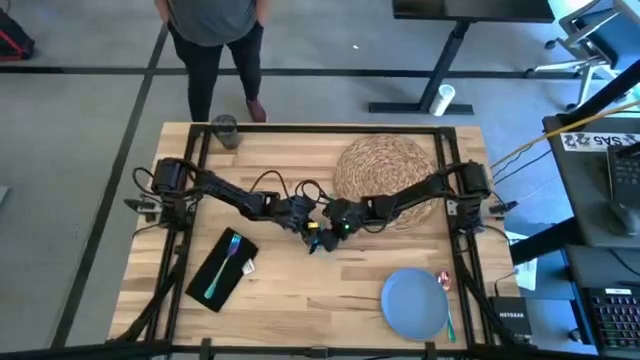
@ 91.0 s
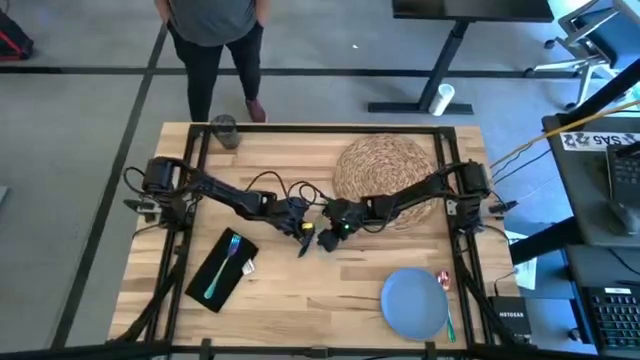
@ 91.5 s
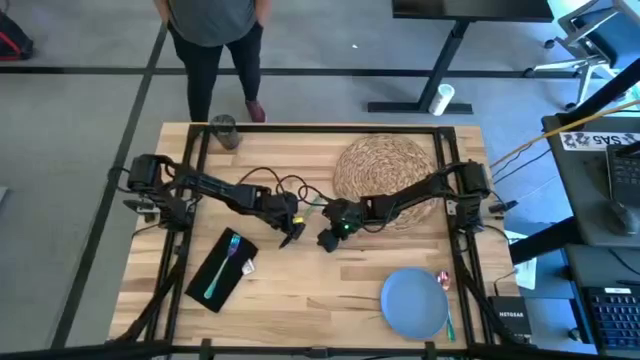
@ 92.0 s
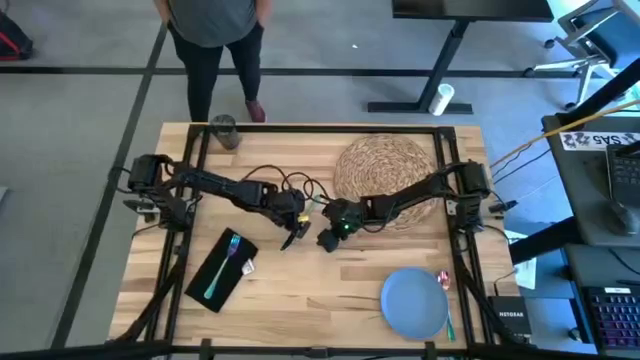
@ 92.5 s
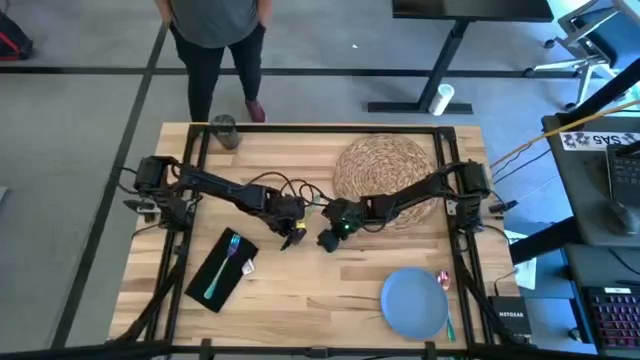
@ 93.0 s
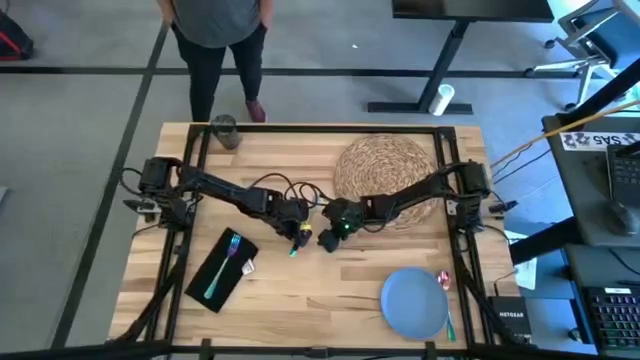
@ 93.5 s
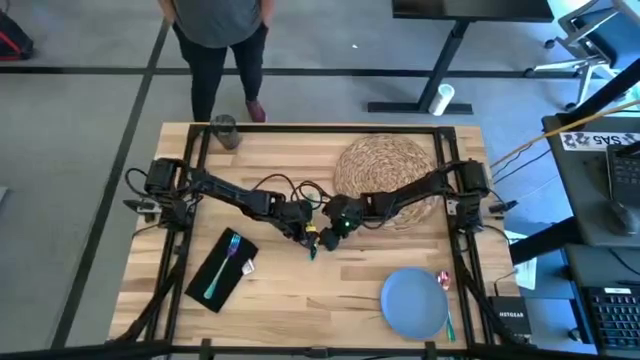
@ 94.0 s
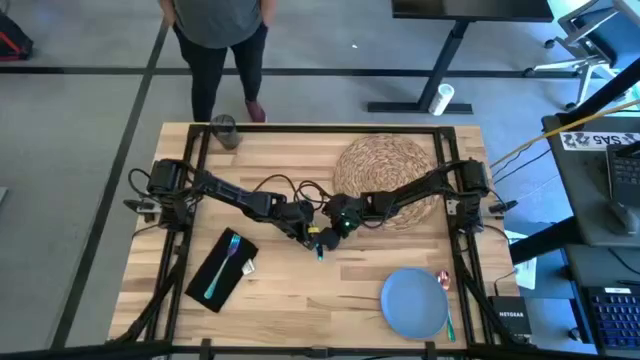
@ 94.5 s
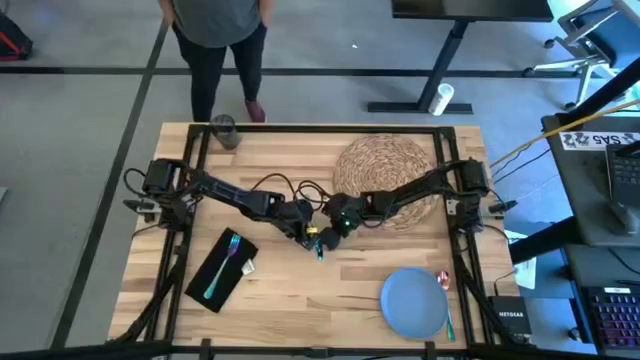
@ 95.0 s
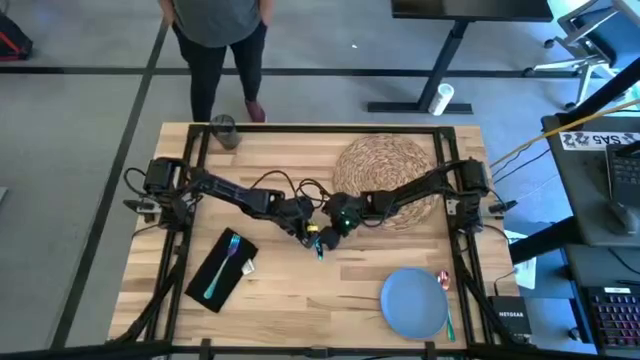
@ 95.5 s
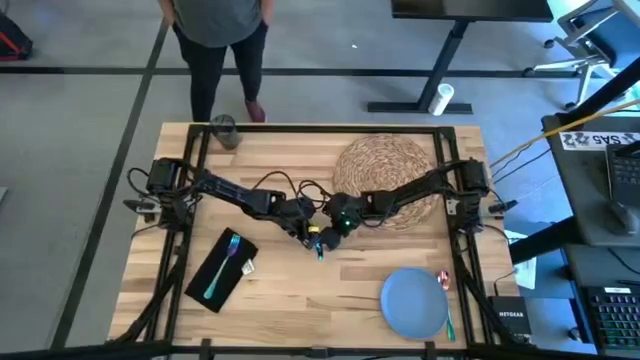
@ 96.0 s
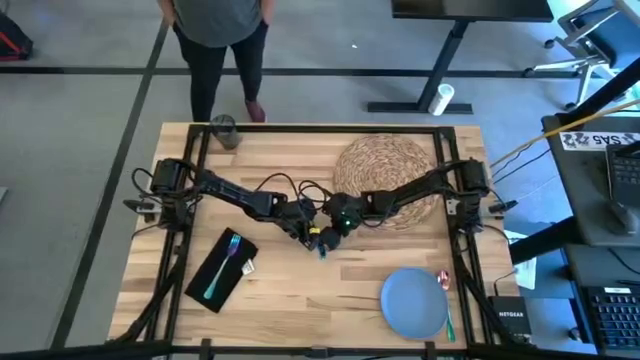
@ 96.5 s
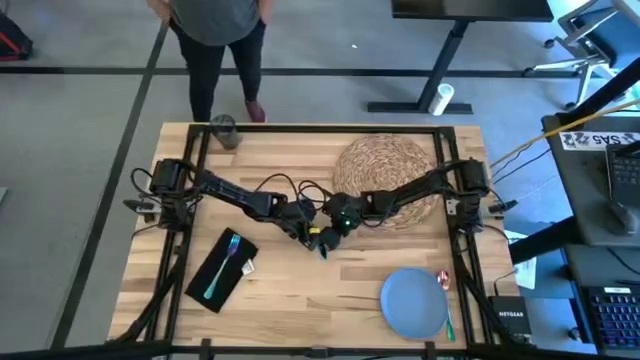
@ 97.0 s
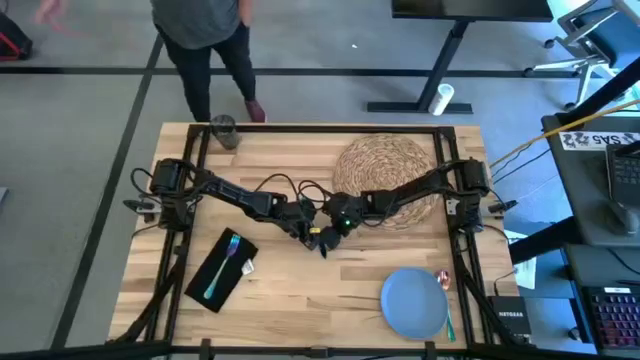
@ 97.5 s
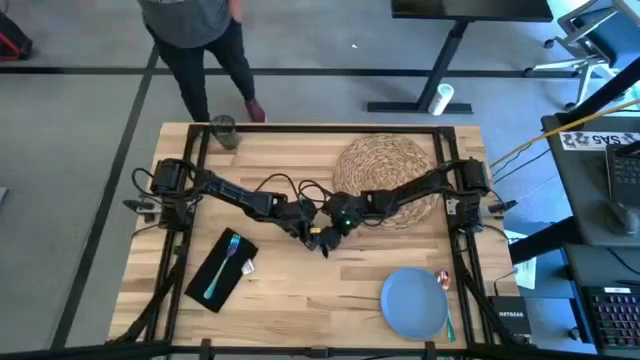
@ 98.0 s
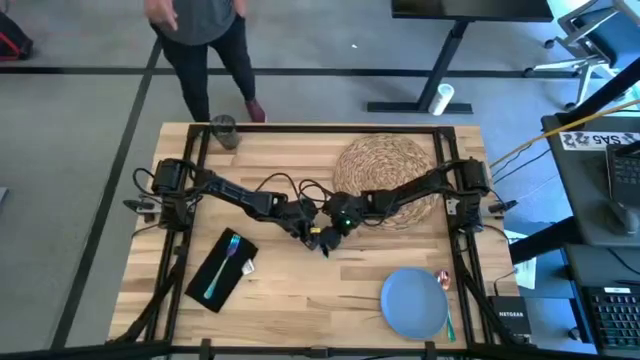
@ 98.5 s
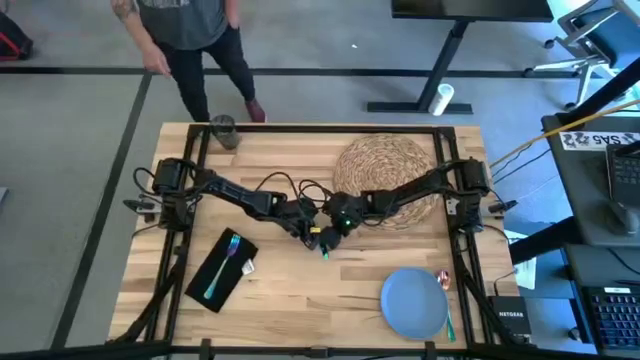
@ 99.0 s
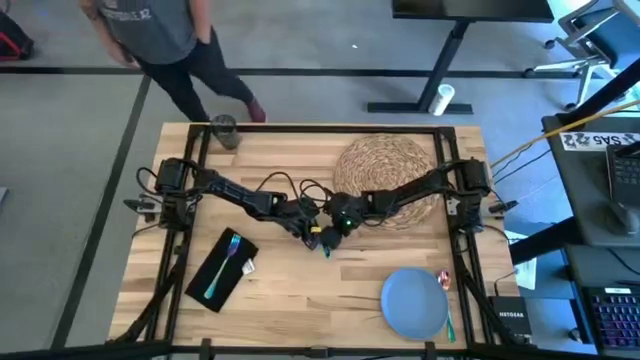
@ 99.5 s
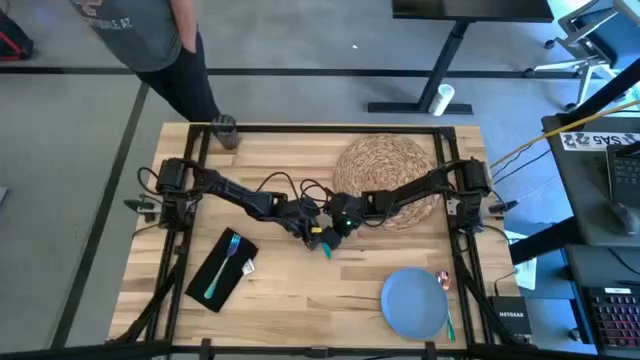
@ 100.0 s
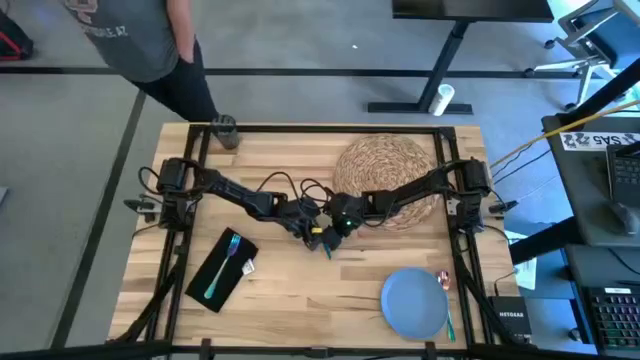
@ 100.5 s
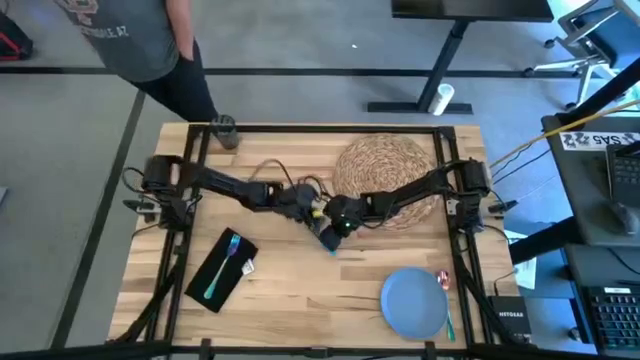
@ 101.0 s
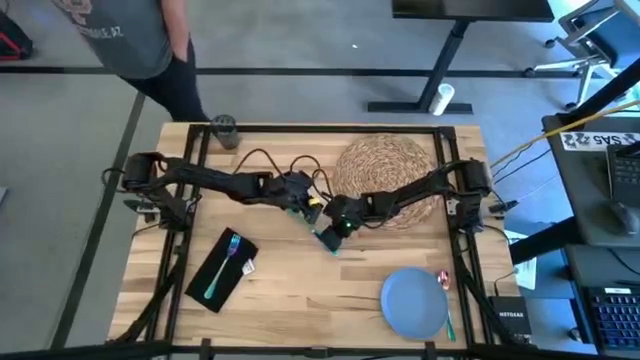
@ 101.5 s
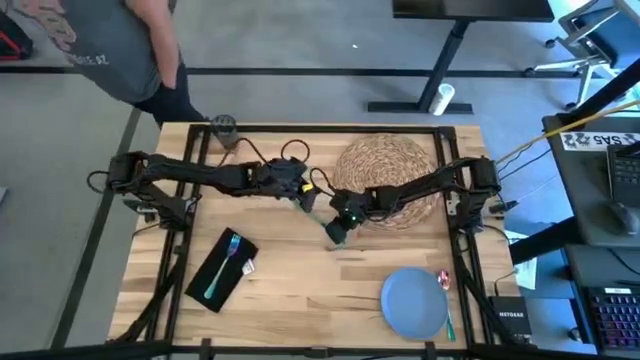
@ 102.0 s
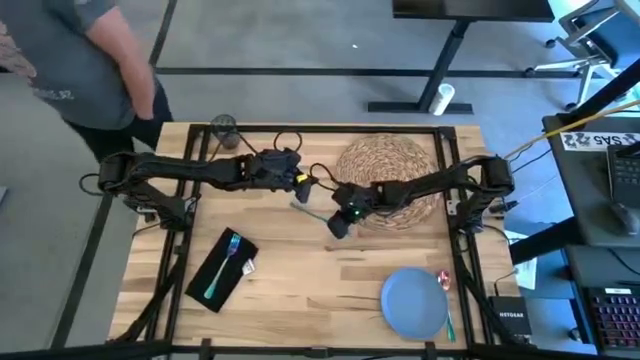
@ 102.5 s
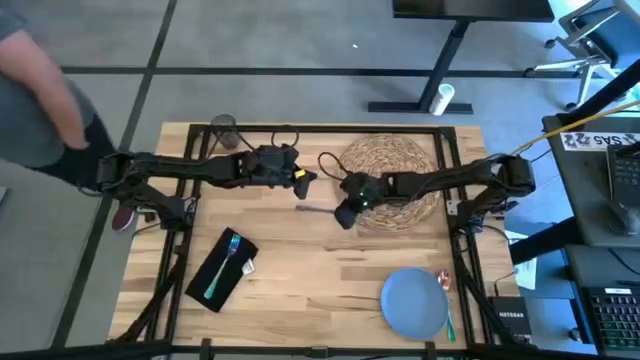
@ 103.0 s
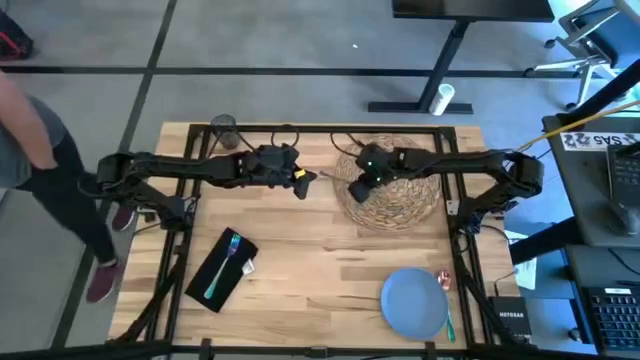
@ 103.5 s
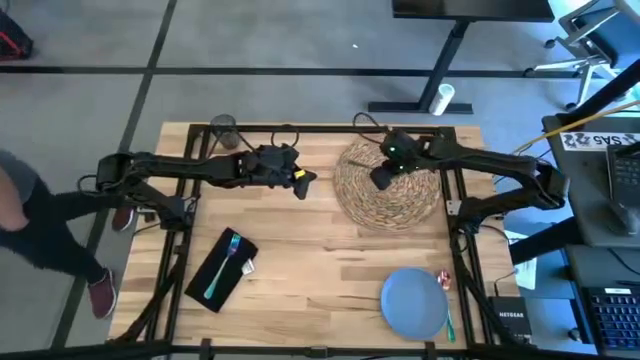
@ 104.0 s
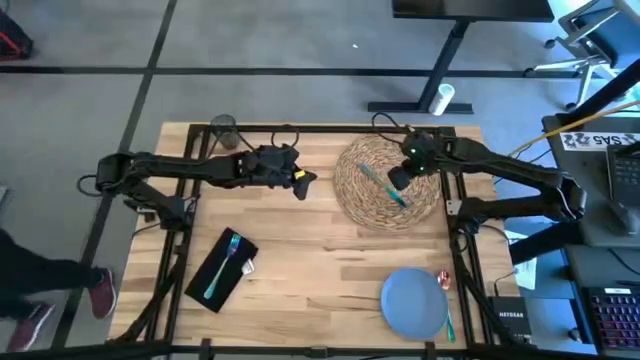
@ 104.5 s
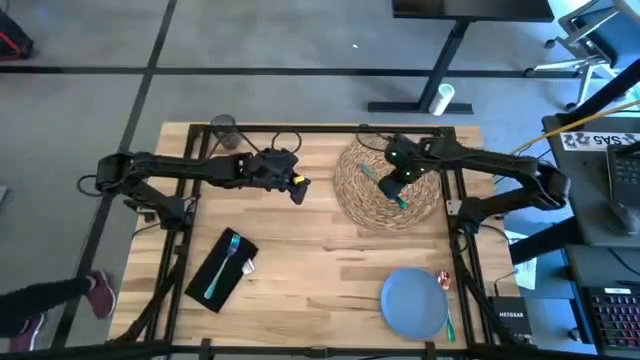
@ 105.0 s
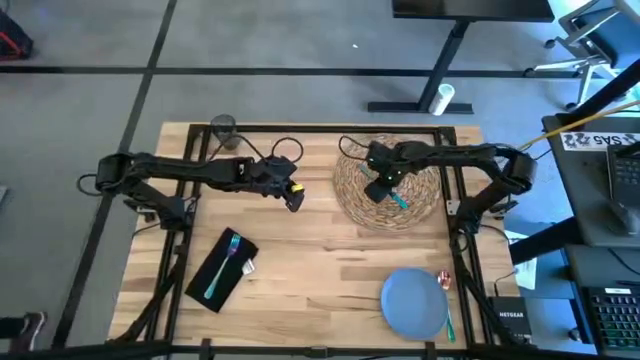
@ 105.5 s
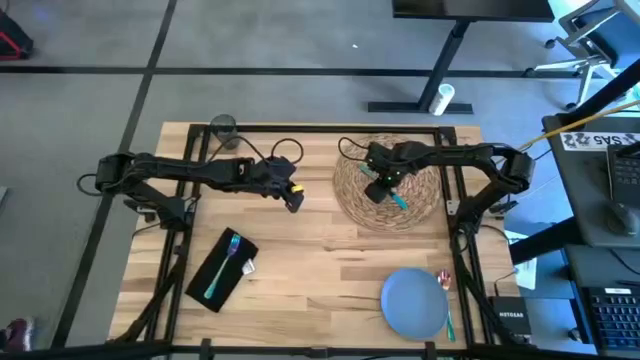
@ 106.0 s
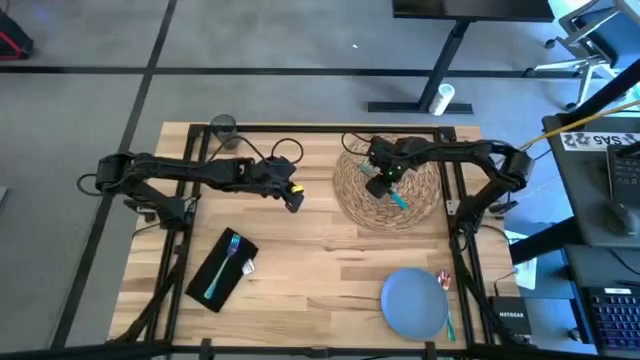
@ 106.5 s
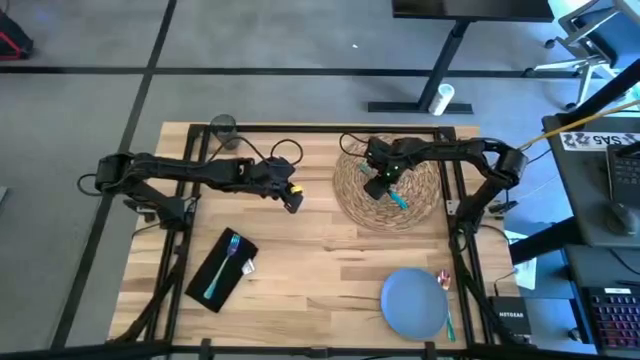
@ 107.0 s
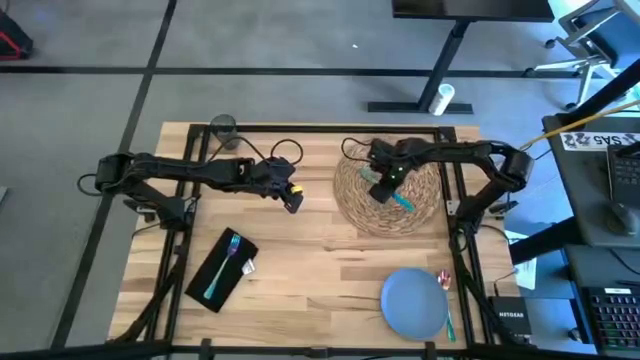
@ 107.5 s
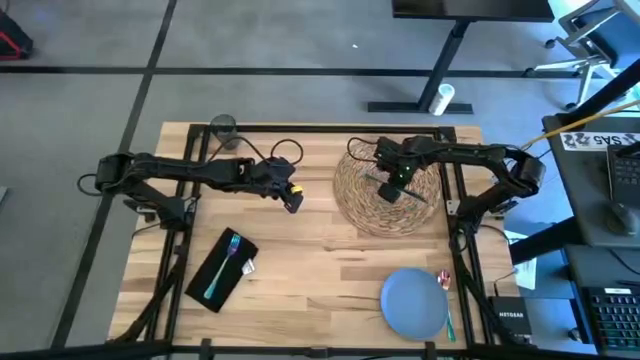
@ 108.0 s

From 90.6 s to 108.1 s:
Task: Set table place
Put the blue knife on the brown placemat

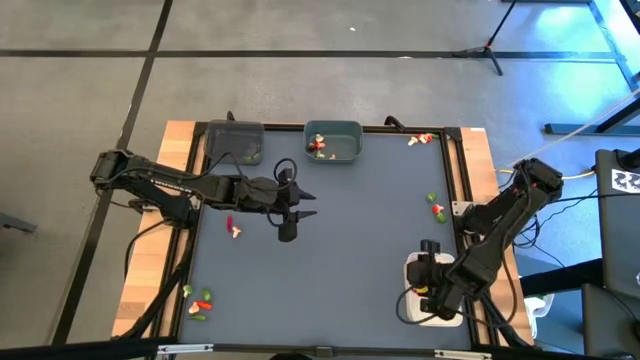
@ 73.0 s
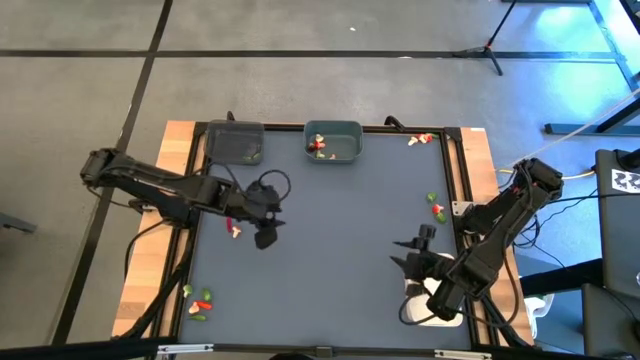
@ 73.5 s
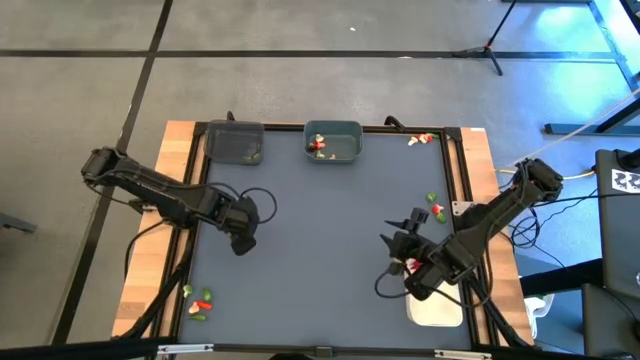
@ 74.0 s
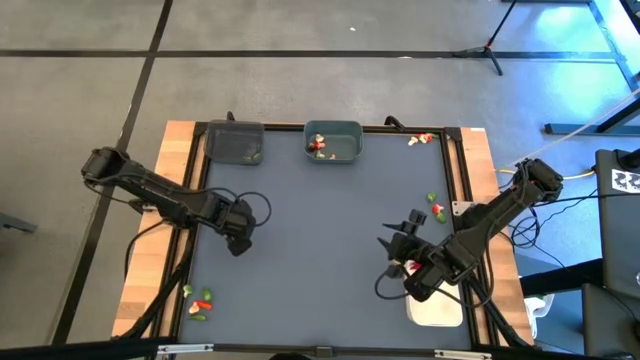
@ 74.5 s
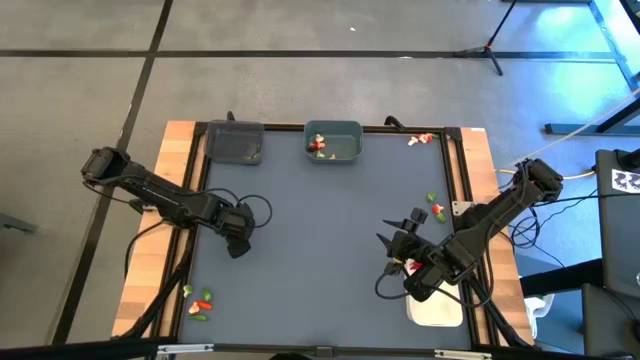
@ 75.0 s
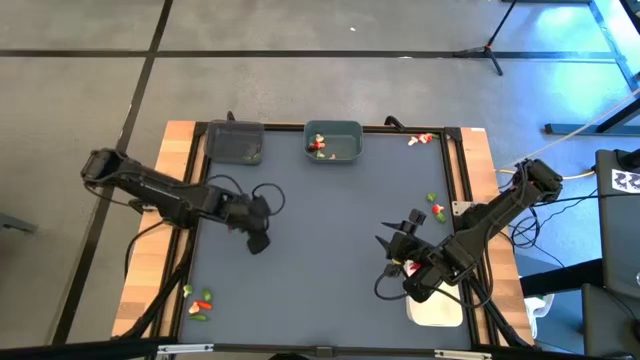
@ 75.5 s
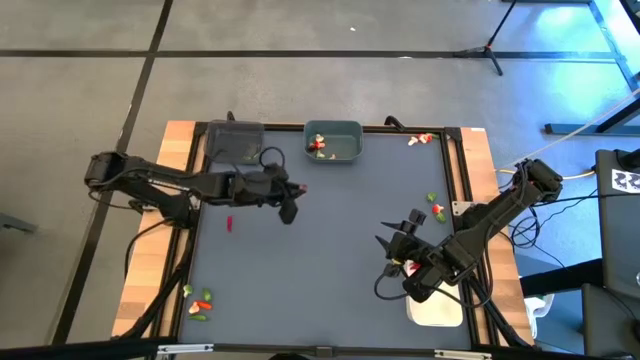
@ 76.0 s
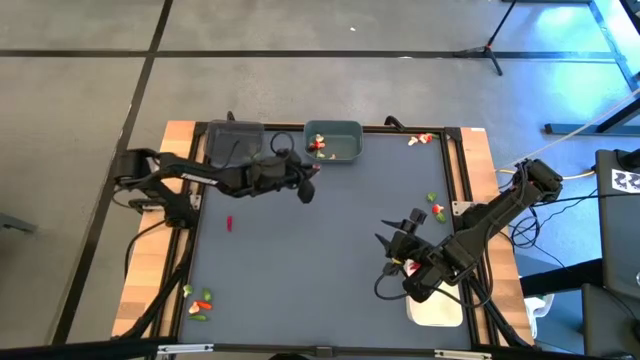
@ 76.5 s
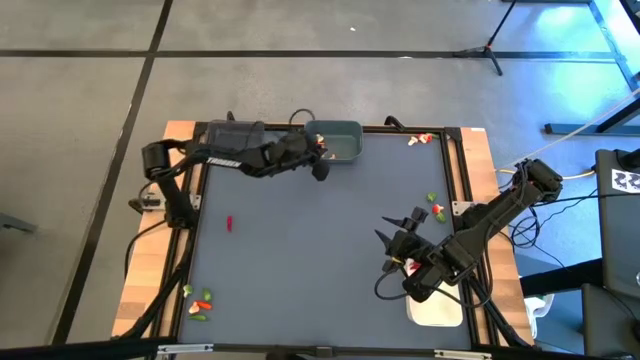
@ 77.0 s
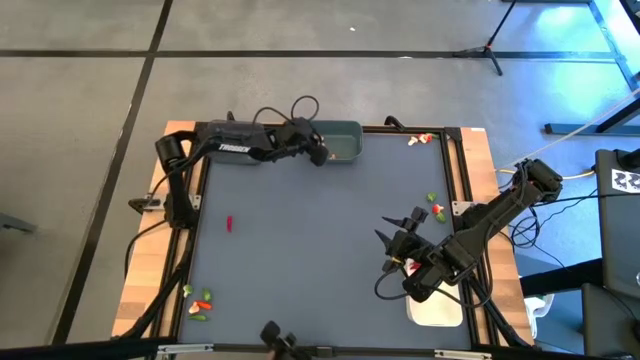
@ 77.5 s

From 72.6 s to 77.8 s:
Task: Sort produce into baskets
Put the brown mushroom into the blue bin
